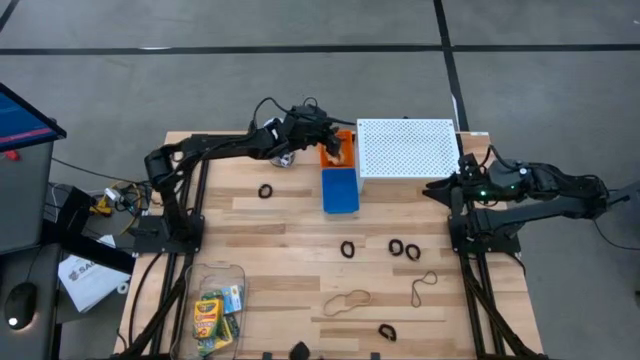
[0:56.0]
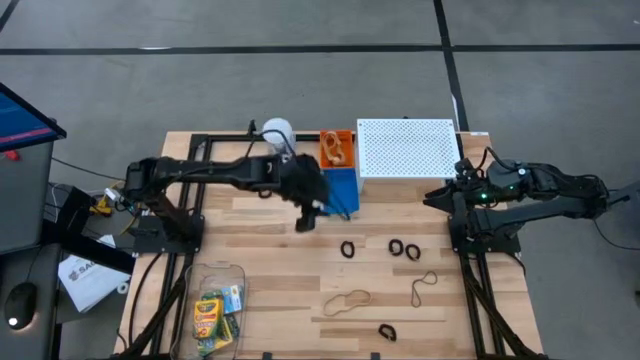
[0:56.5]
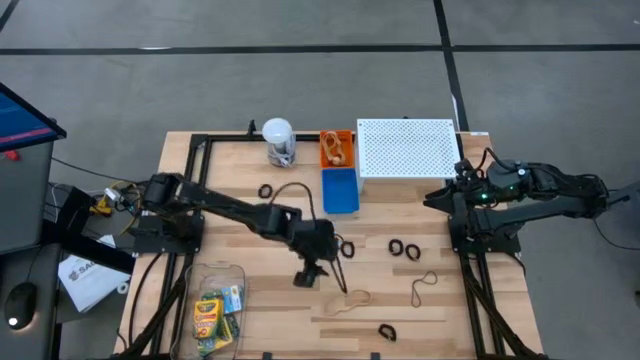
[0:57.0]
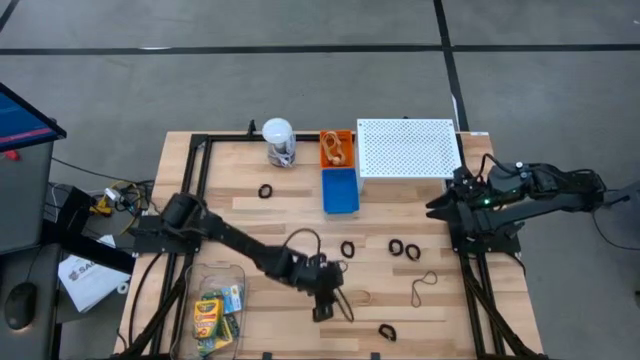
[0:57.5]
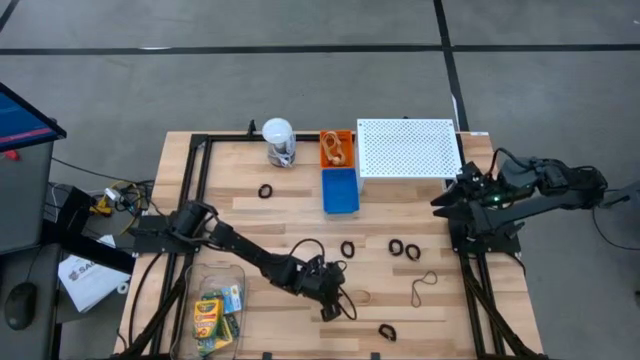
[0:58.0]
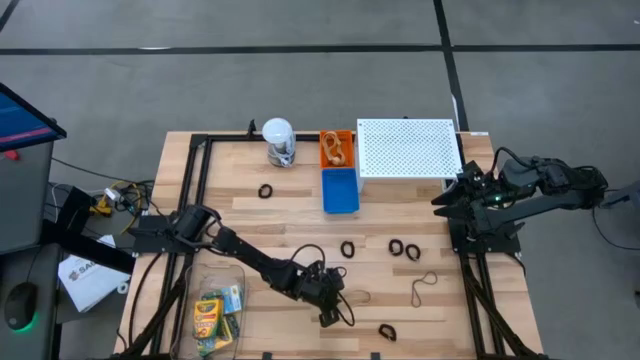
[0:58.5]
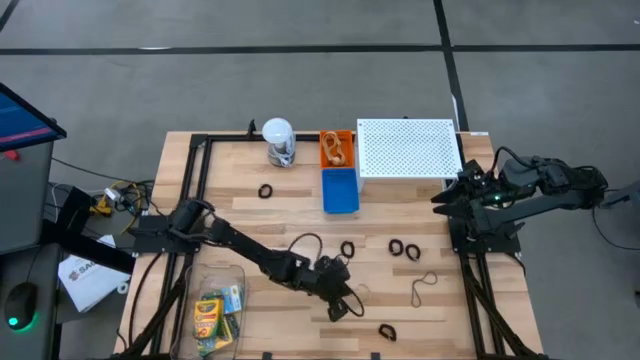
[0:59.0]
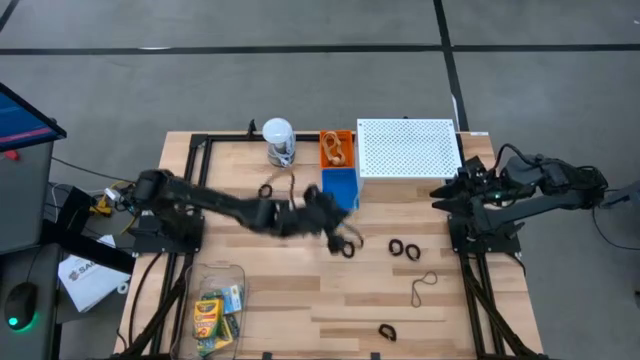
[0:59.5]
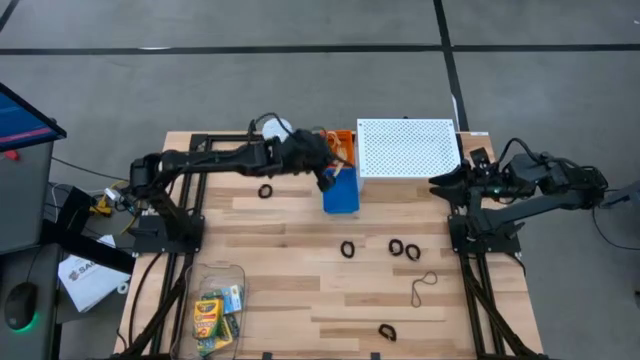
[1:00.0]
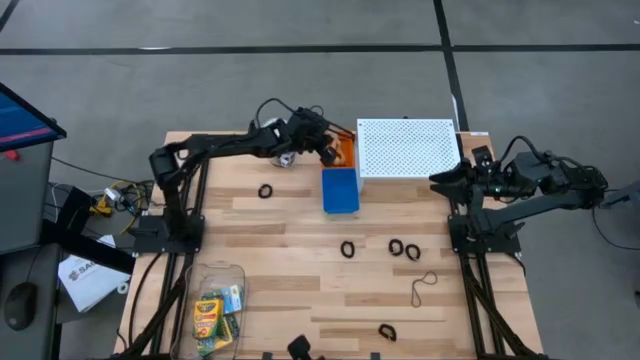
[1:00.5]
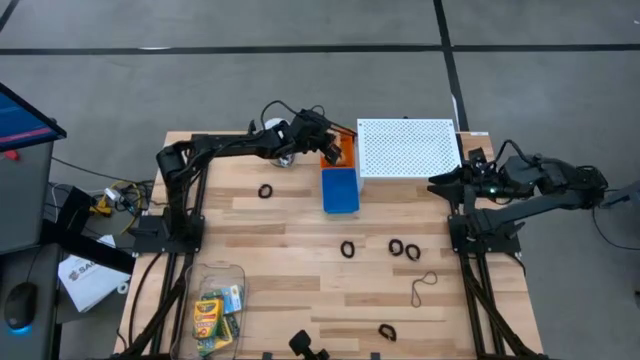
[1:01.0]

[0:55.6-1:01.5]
Task: Pick & Place Office Desk Supplies
Put the brown rubber band into the orange basket

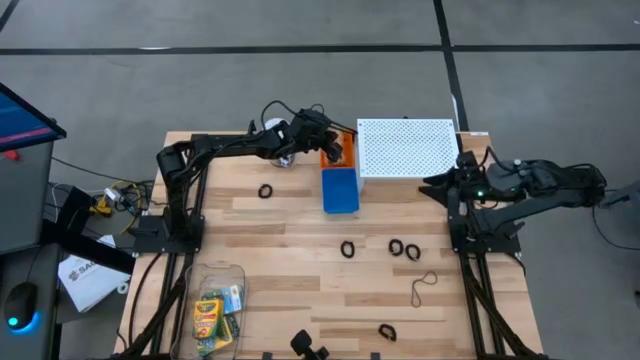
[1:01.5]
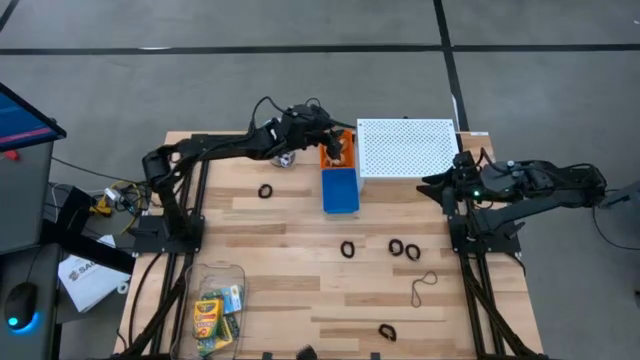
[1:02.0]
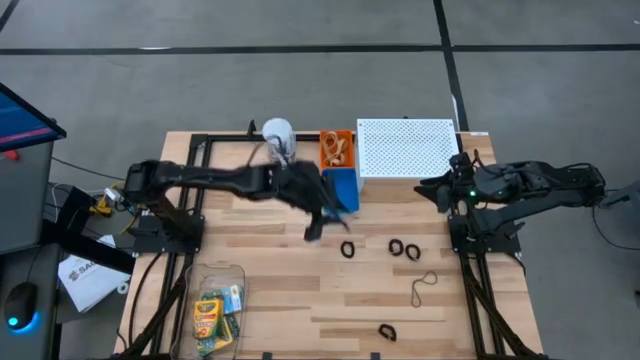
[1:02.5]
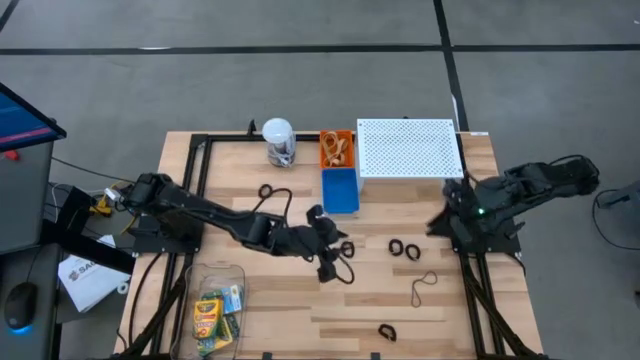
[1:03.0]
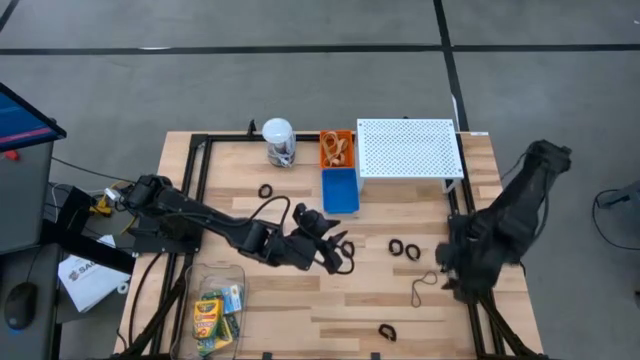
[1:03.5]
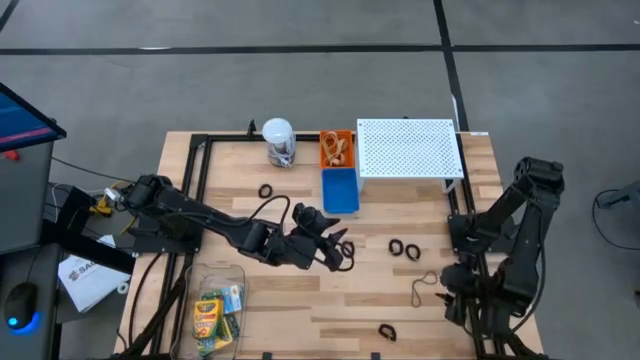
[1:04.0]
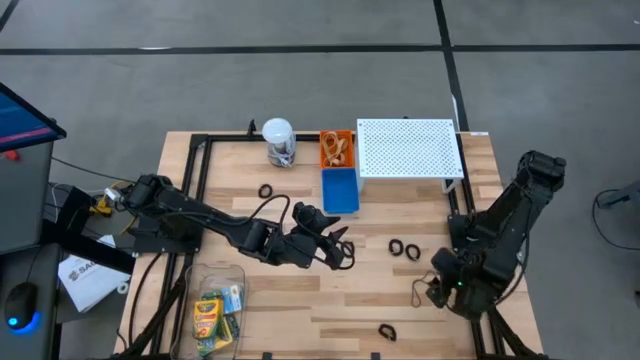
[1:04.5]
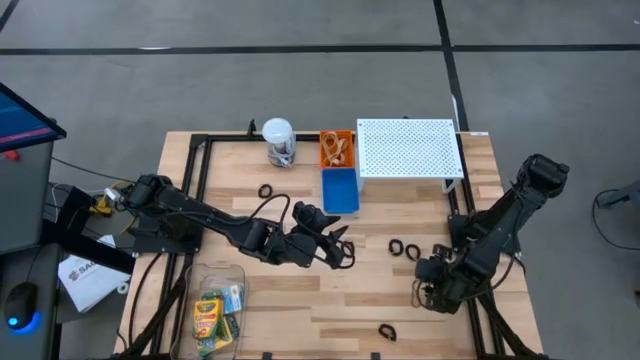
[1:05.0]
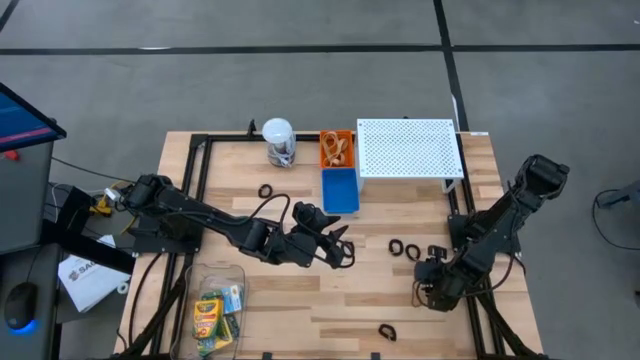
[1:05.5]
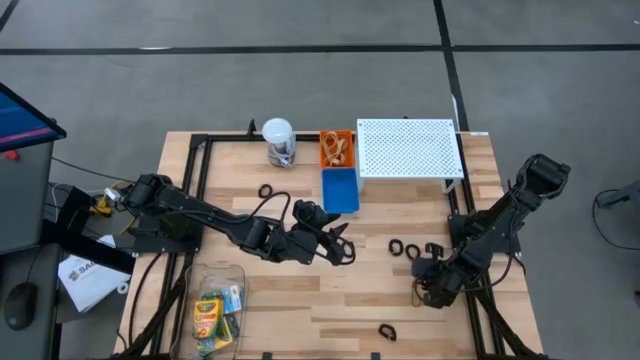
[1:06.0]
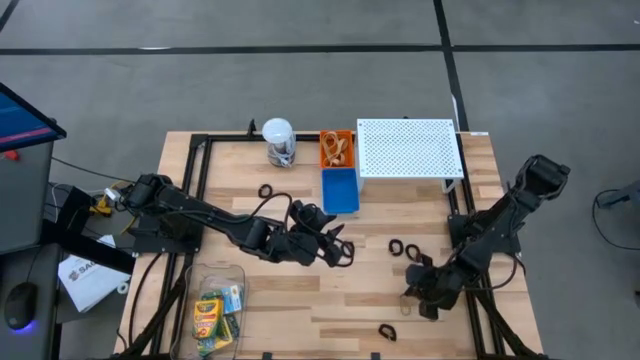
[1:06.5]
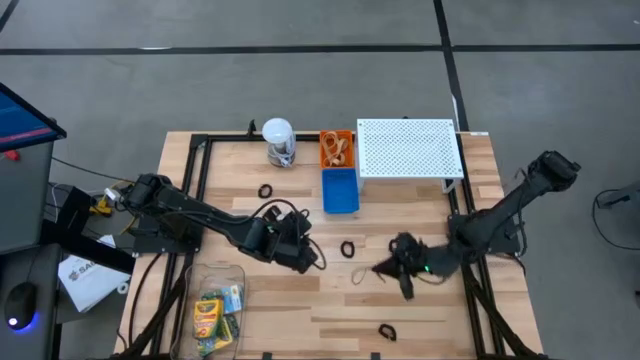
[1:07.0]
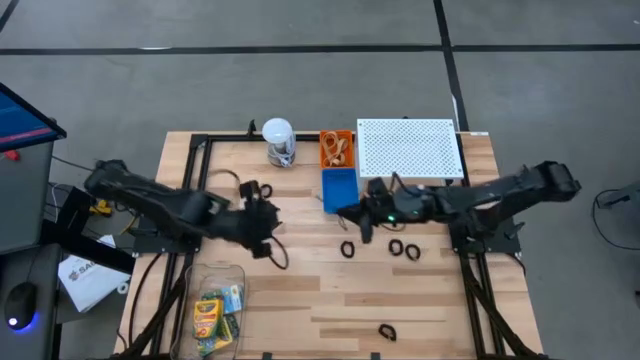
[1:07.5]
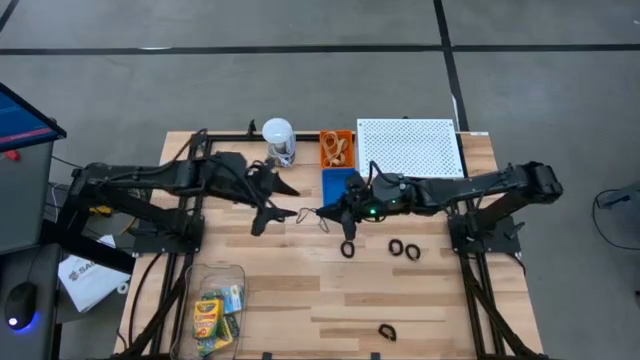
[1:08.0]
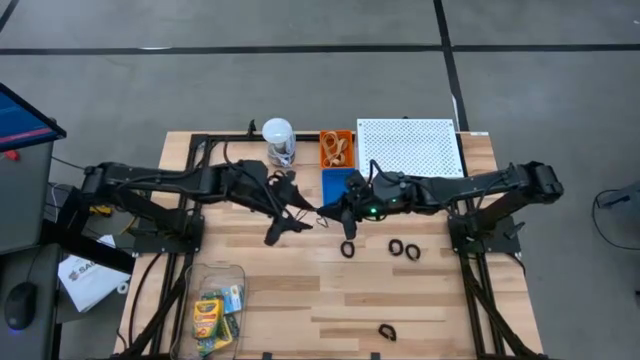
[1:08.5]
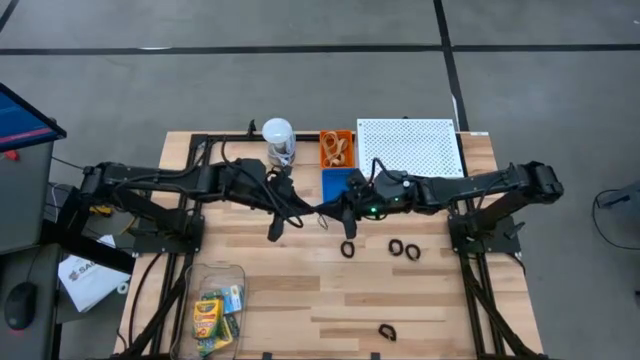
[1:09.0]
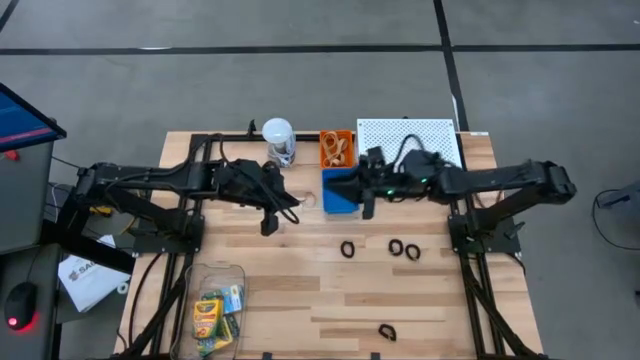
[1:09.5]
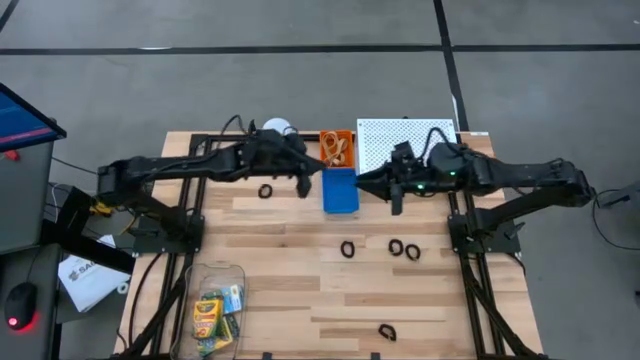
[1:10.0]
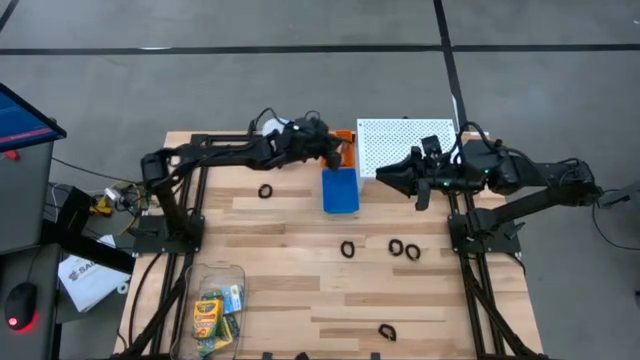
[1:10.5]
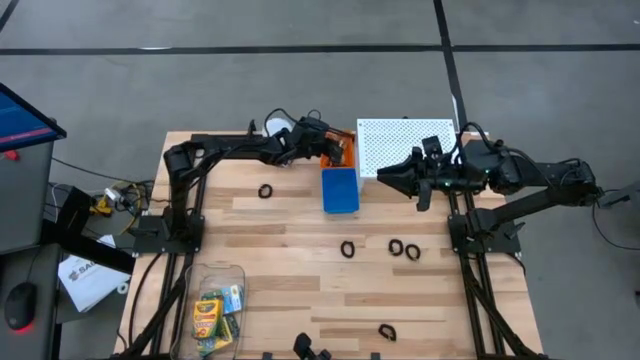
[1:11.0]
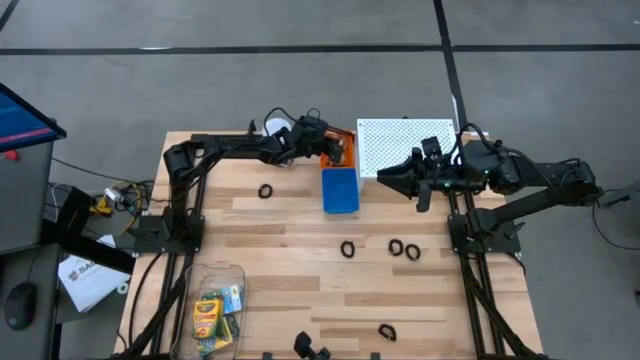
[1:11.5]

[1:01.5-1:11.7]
Put the purple rubber band into the orange basket

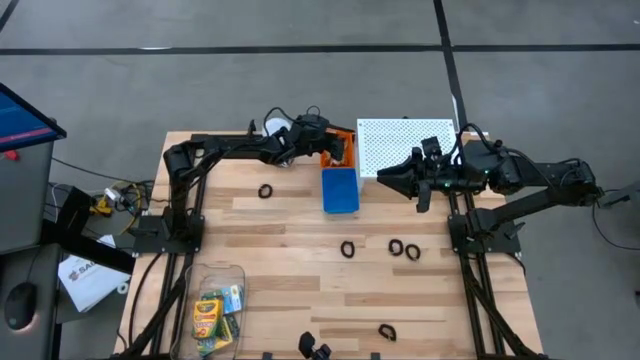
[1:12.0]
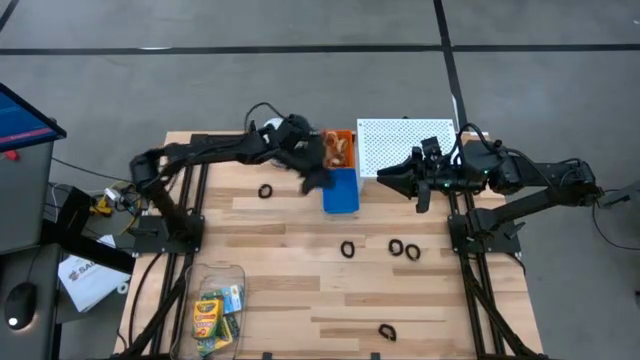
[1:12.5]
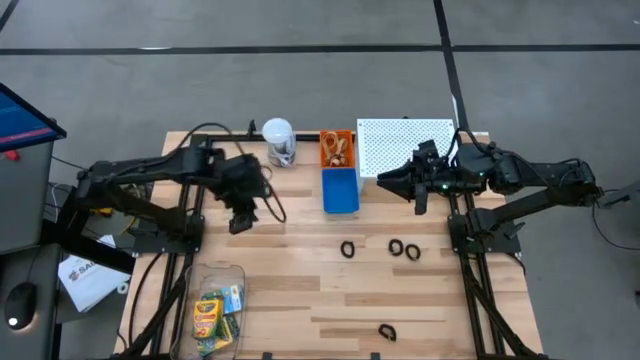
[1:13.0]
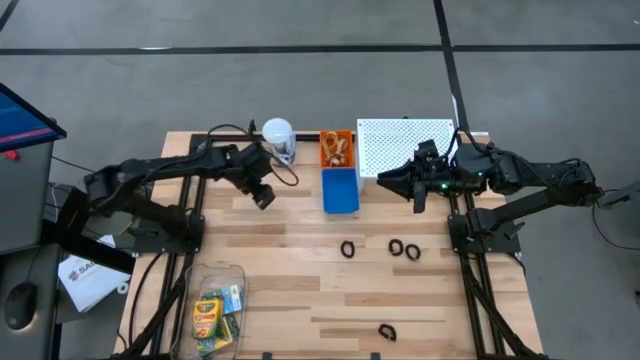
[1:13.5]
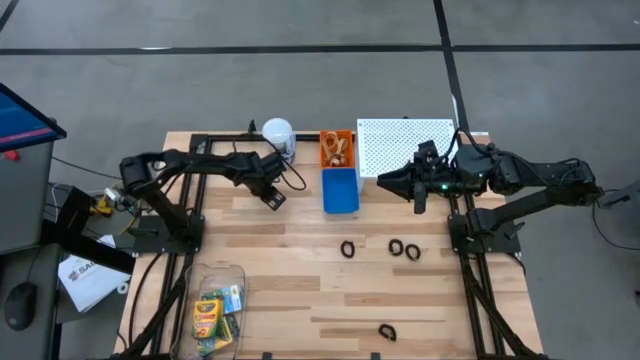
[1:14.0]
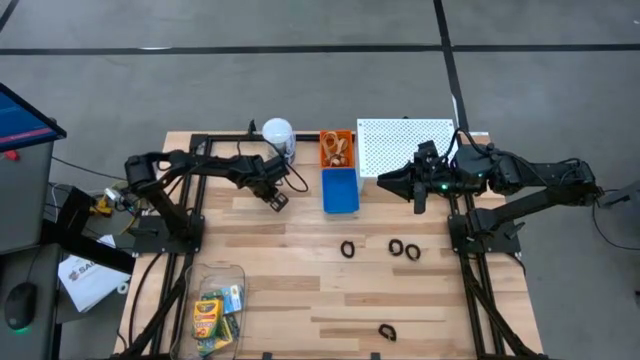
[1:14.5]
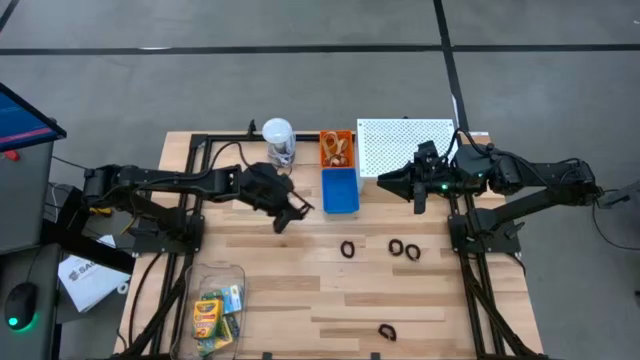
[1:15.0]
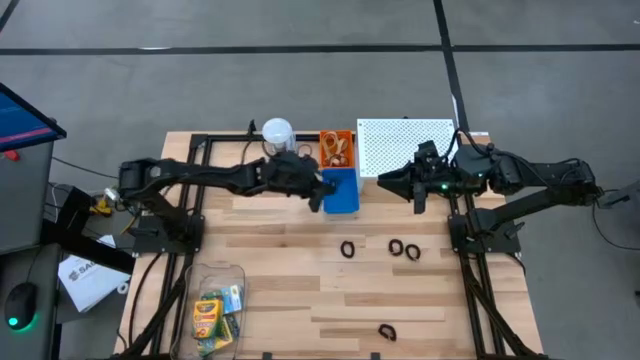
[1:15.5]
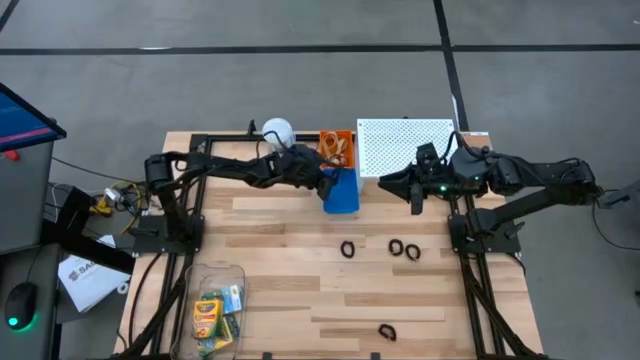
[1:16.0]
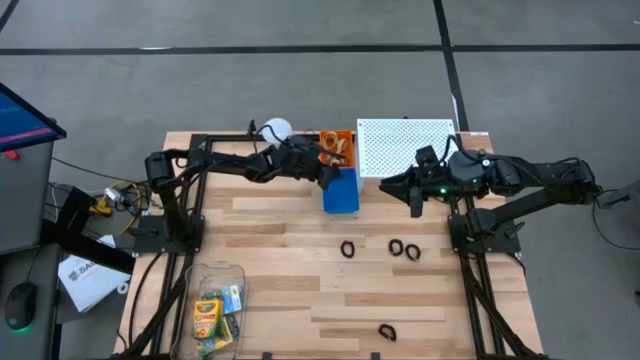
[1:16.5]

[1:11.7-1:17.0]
Put the black spring keychain into the blue basket
